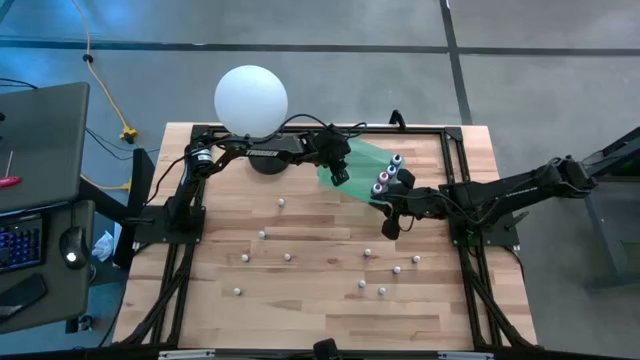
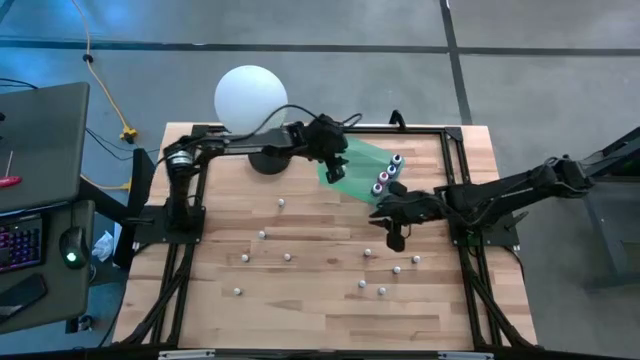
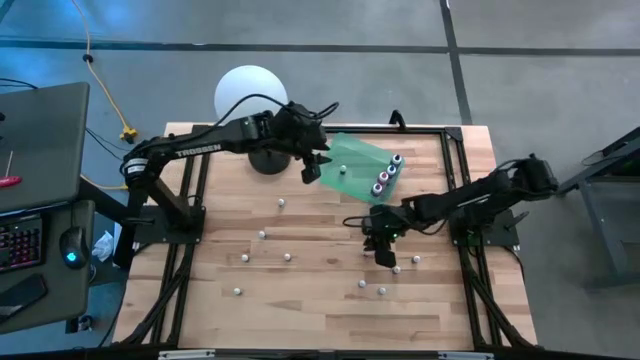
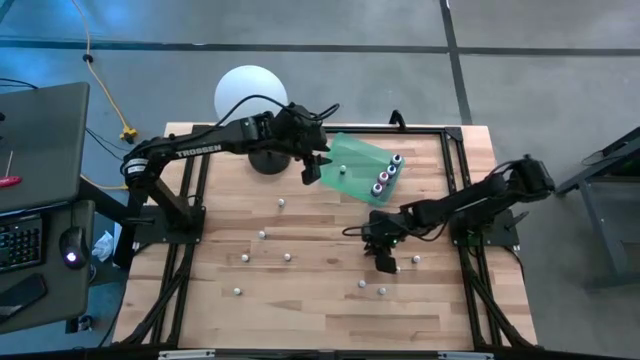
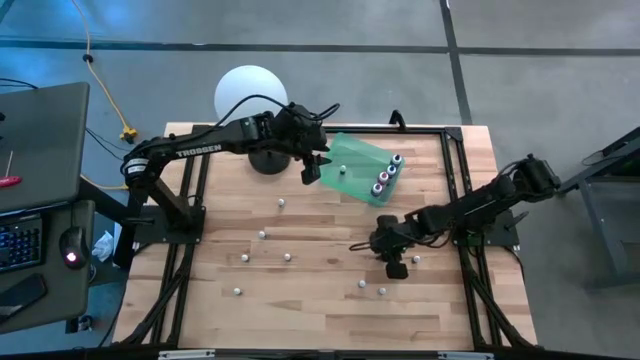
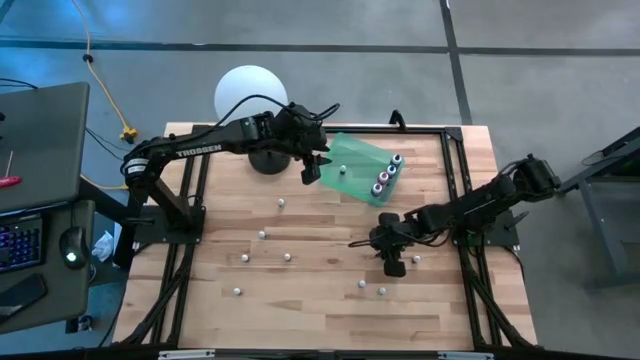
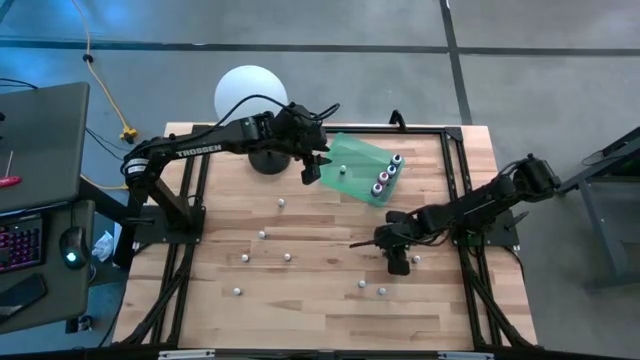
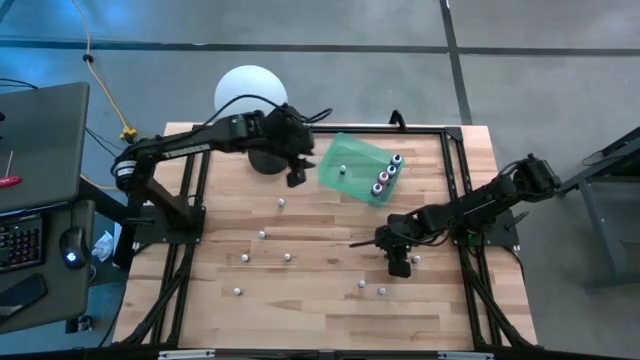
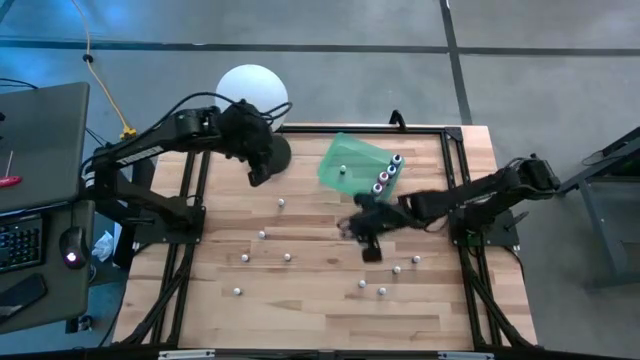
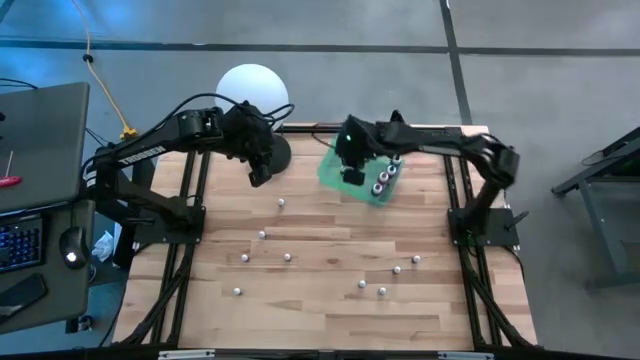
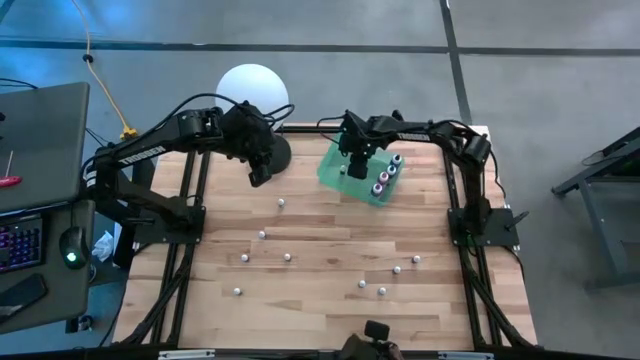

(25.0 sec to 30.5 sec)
Task: Pick & Place food coloring
Put the small black food coloring bottle into the green bin

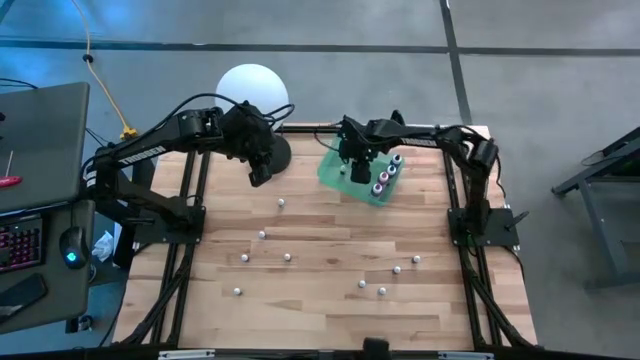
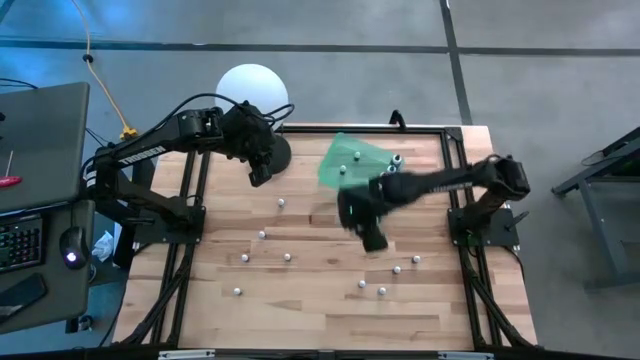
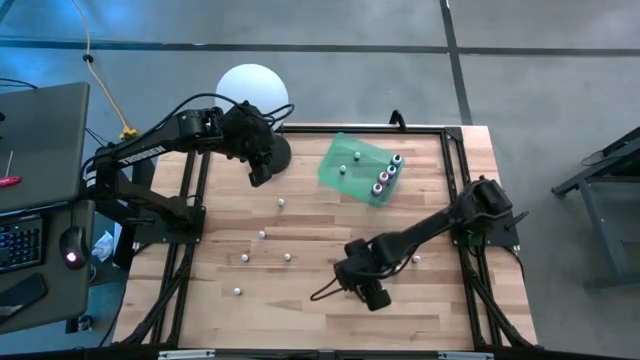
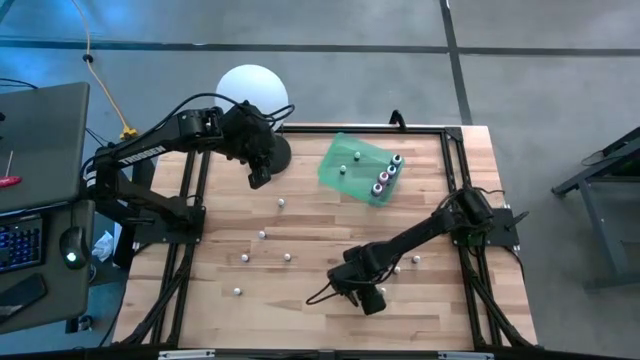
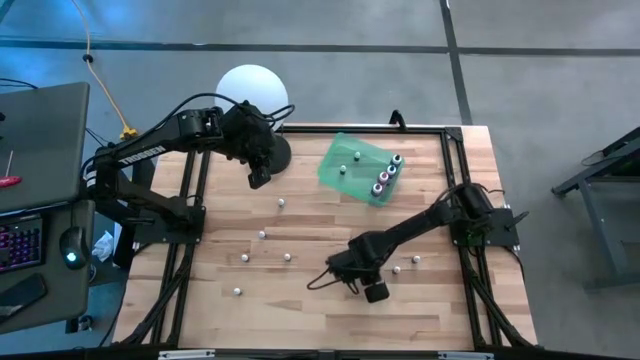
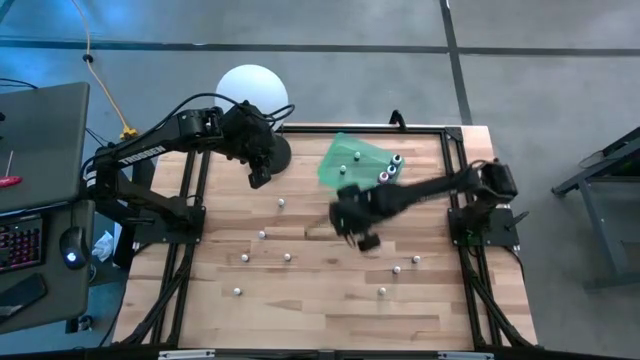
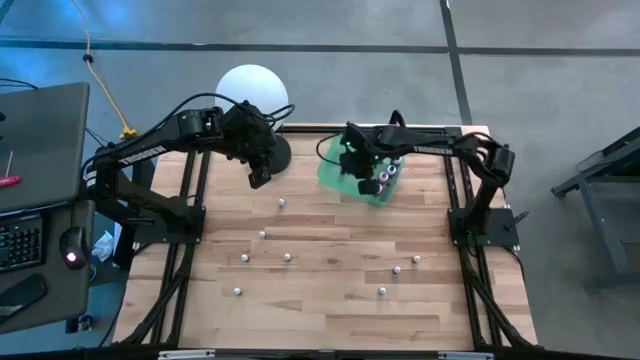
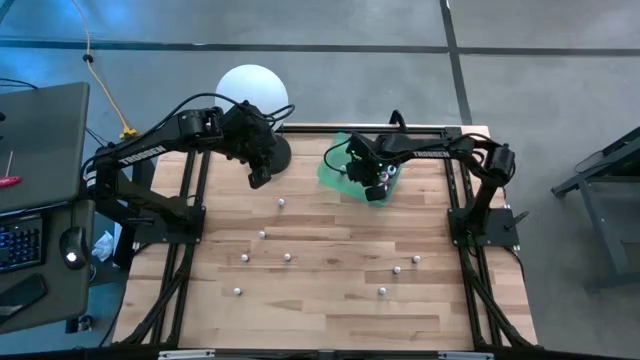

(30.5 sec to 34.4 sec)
Put the small black food coloring bottle into the green bin

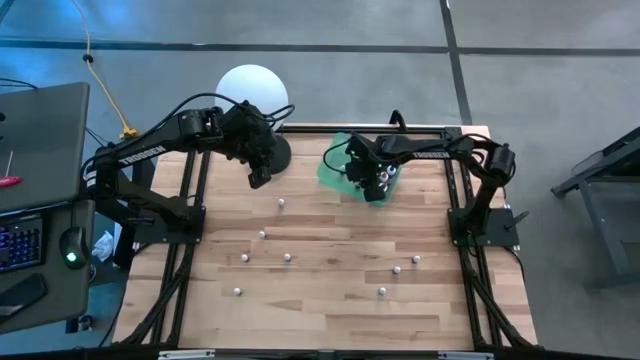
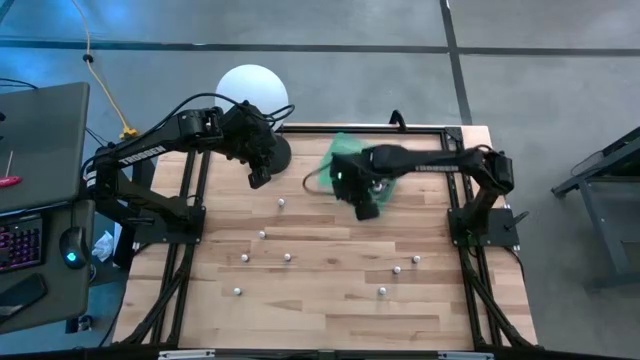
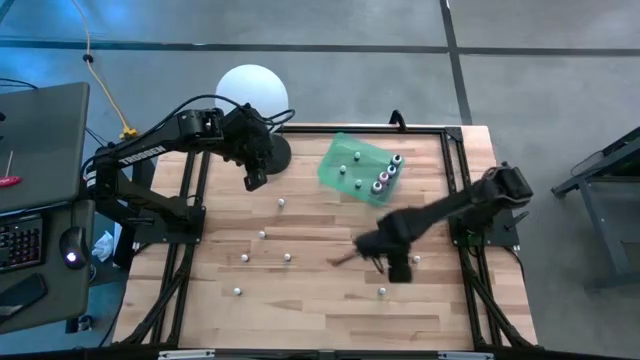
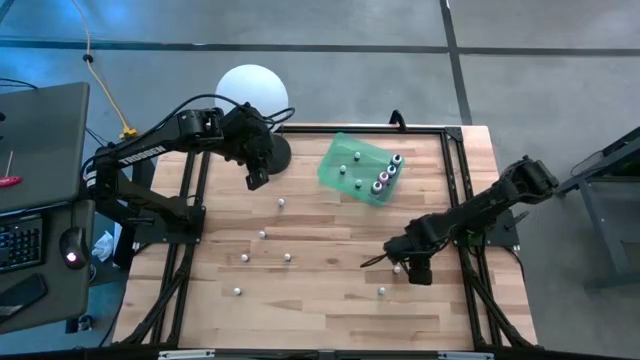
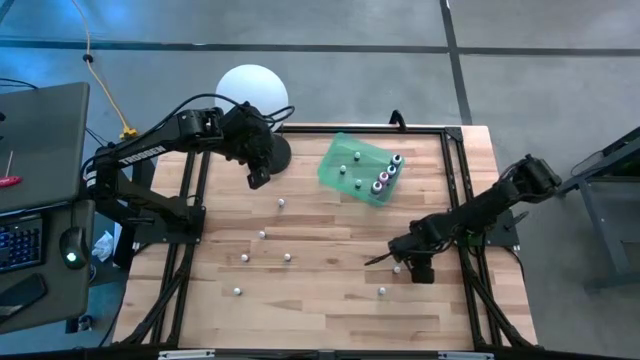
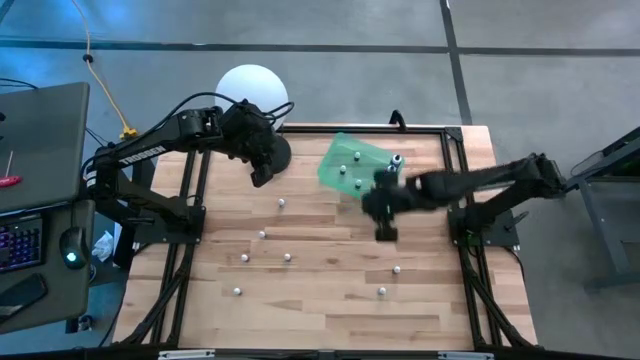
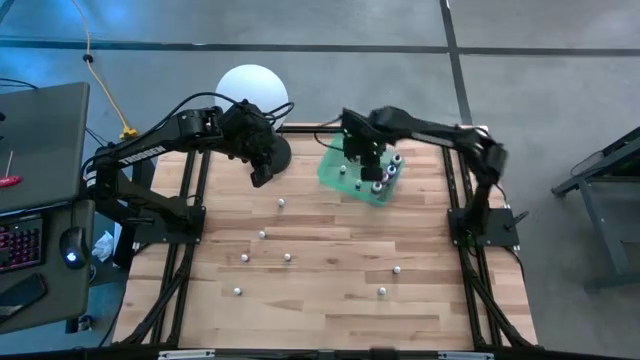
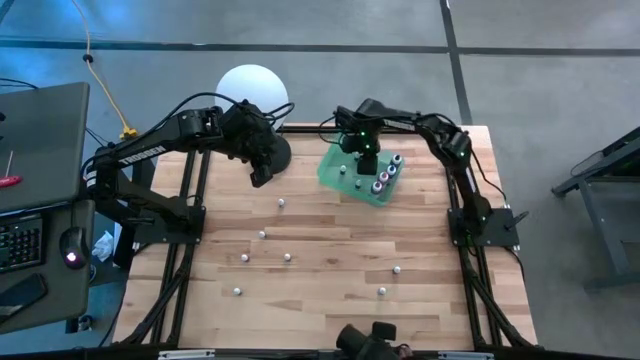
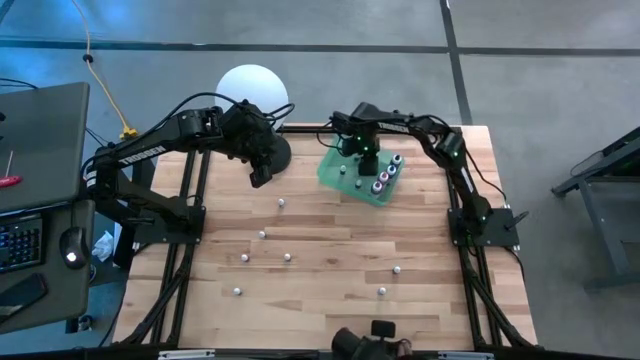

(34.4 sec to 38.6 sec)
Put the small purple food coloring bottle into the green bin

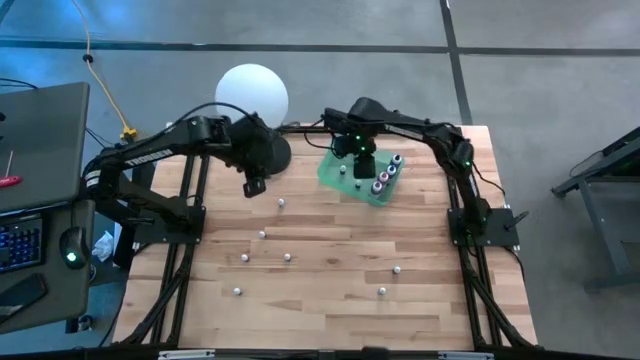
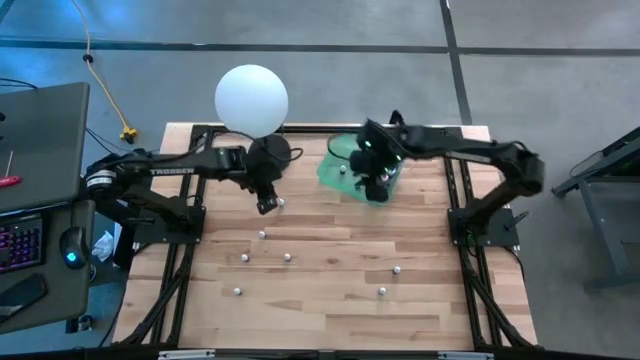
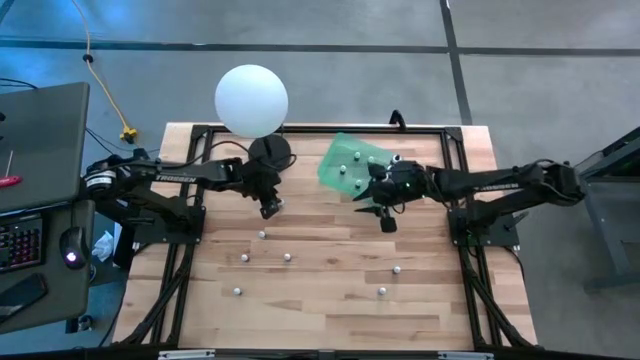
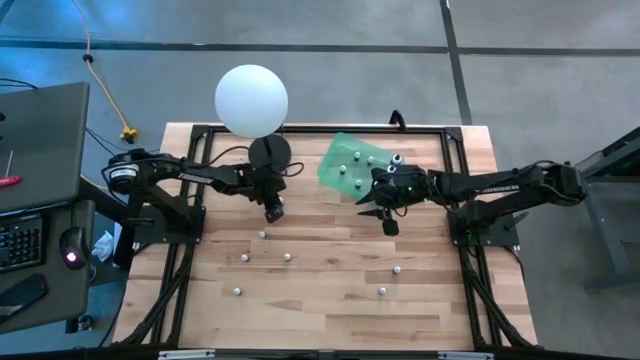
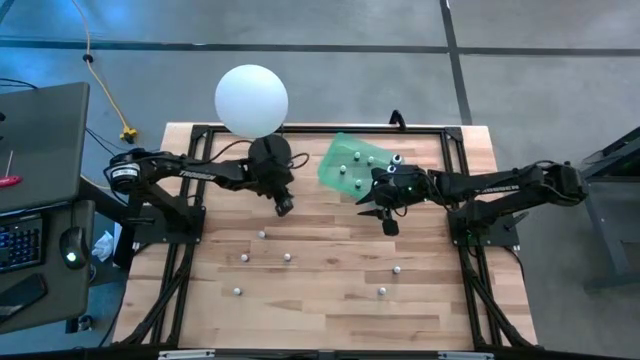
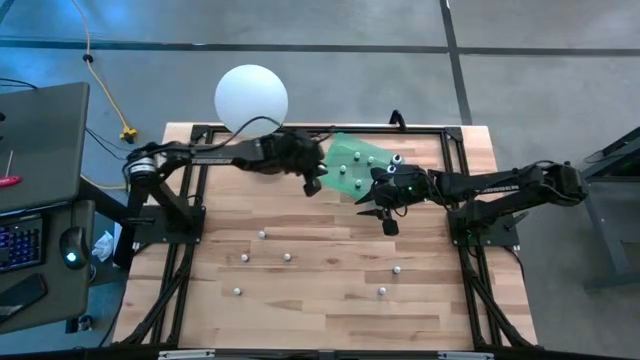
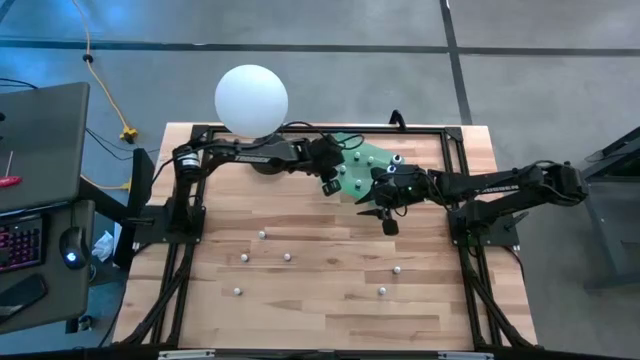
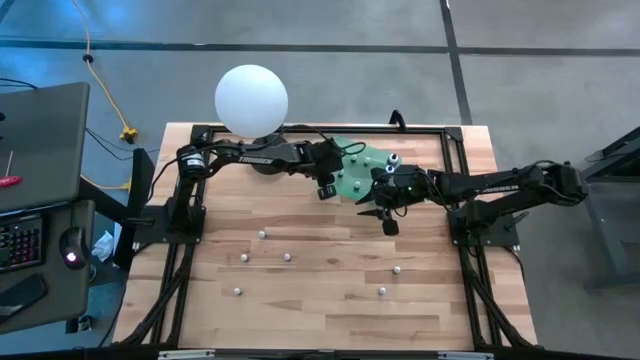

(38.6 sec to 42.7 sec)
Put the small green food coloring bottle into the green bin

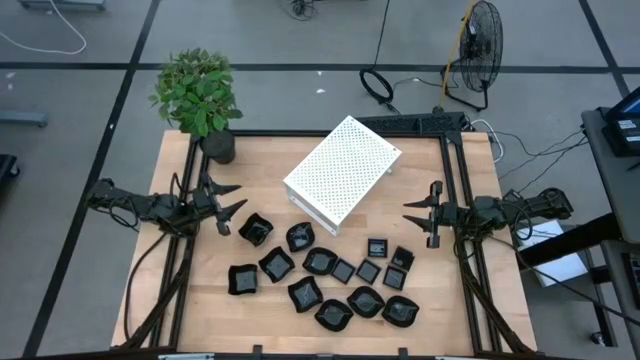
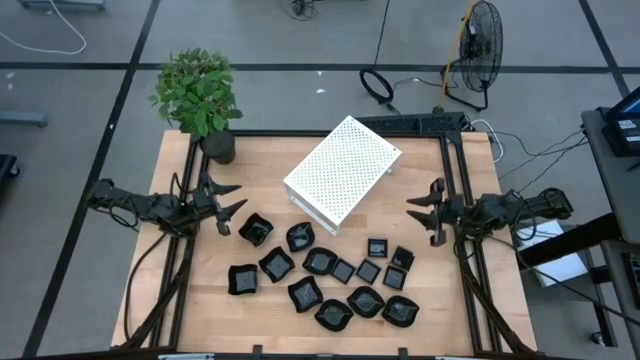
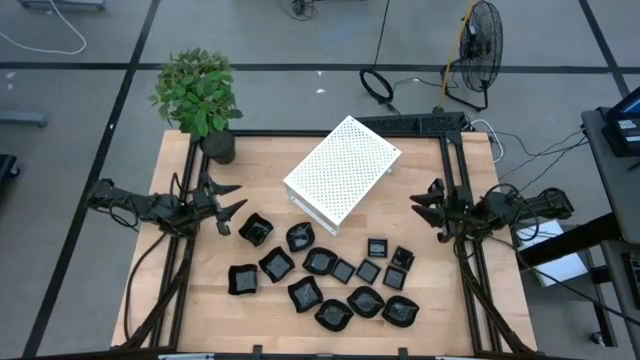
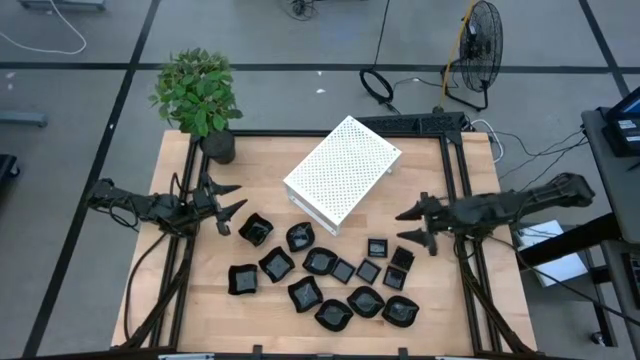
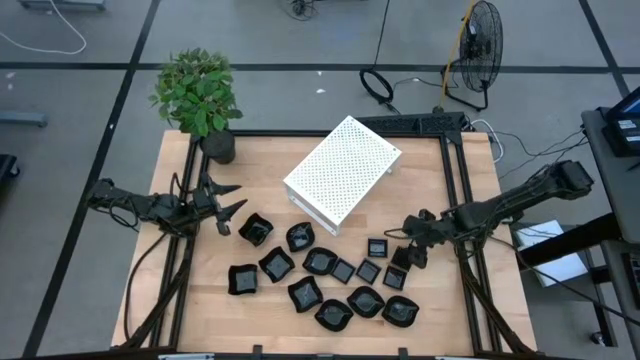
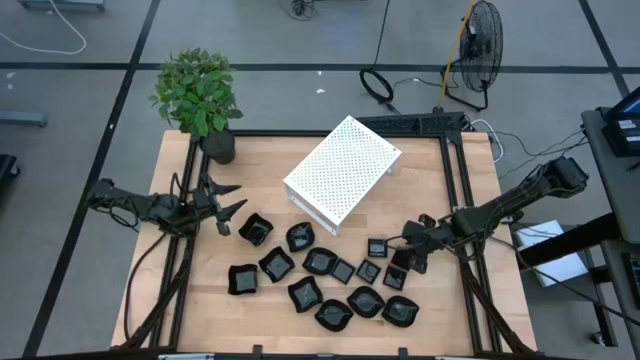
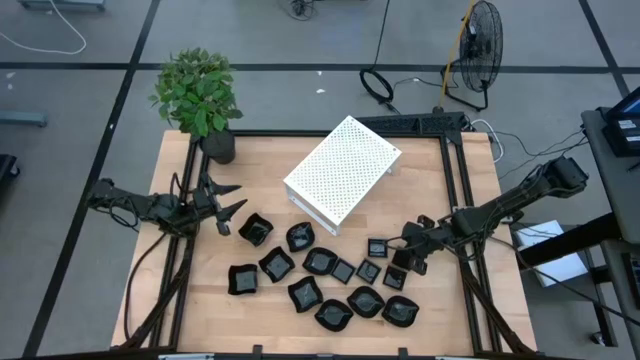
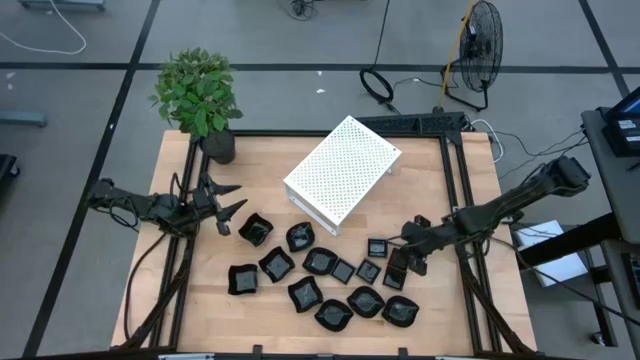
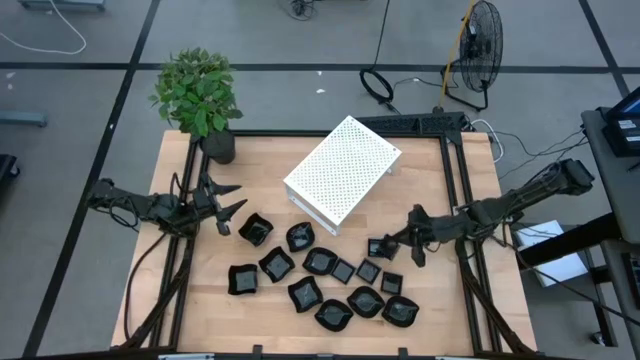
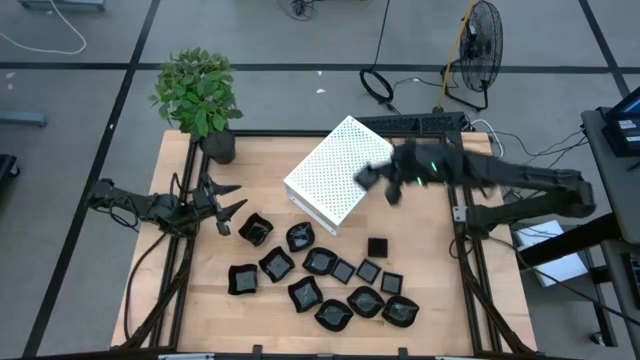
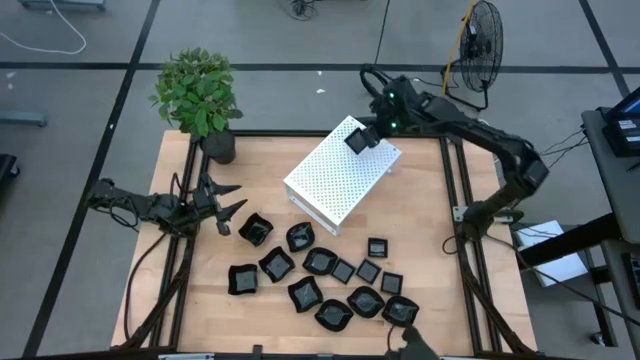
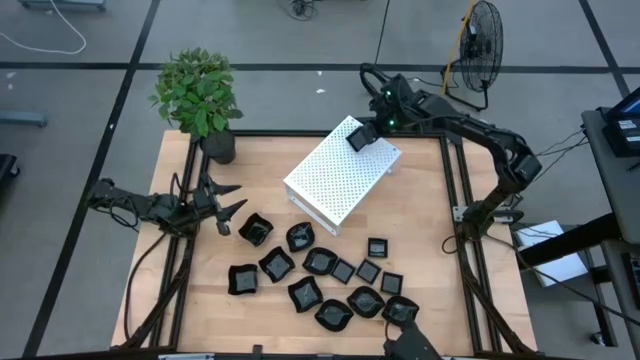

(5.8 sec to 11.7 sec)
Task: Pick & Place Mini shaped plates
Put the black square plate on the shelf
